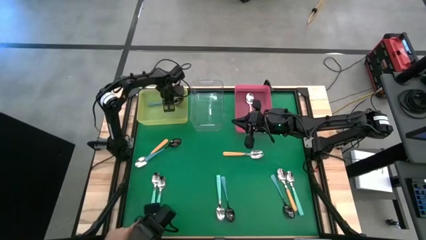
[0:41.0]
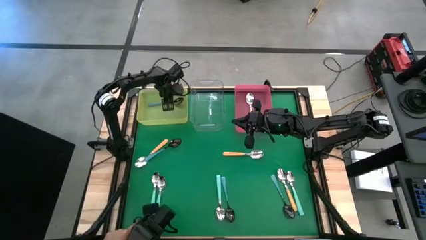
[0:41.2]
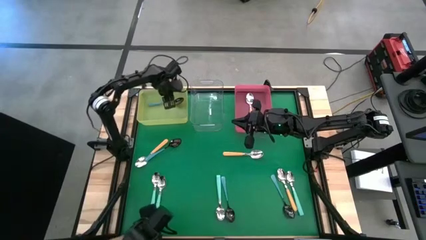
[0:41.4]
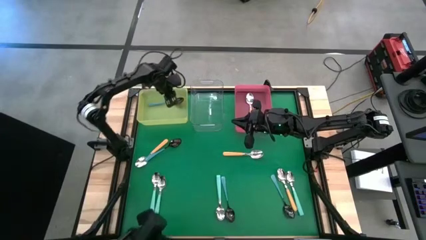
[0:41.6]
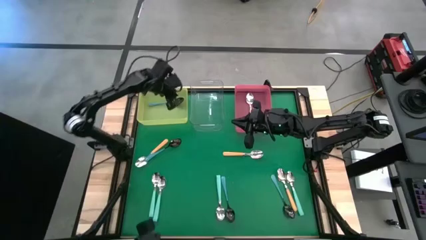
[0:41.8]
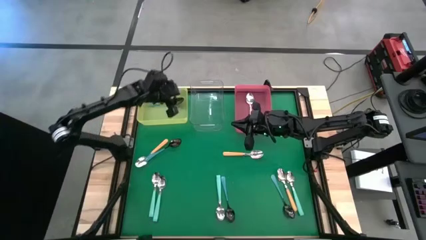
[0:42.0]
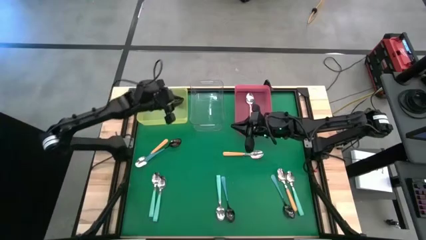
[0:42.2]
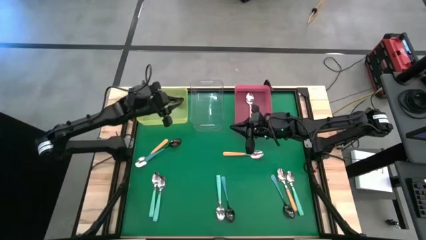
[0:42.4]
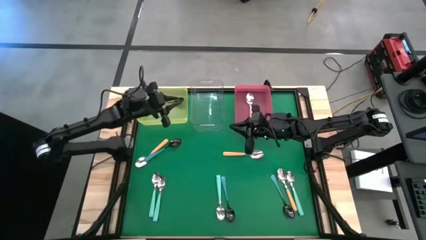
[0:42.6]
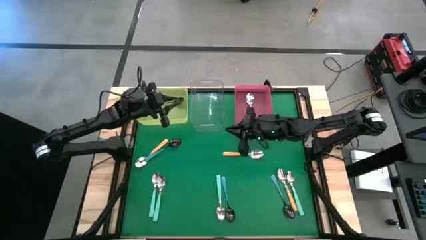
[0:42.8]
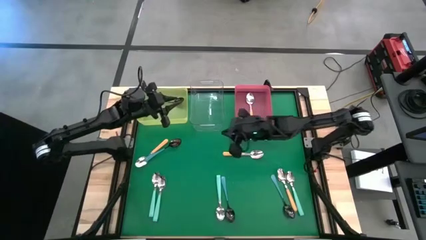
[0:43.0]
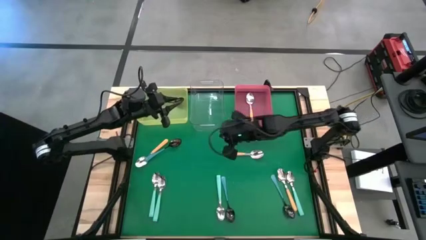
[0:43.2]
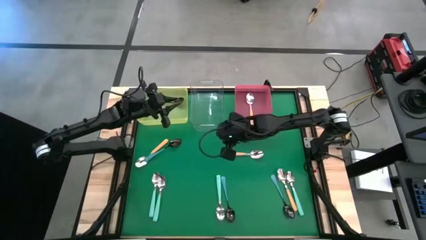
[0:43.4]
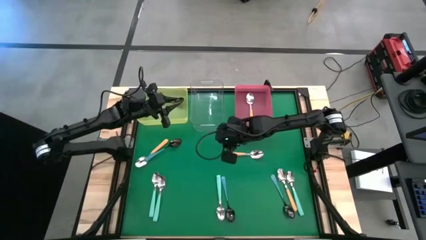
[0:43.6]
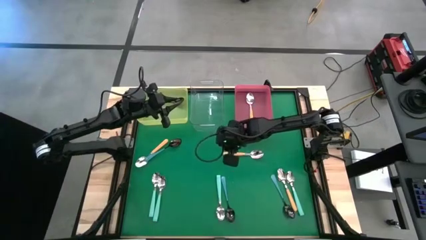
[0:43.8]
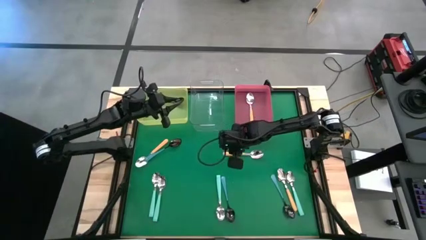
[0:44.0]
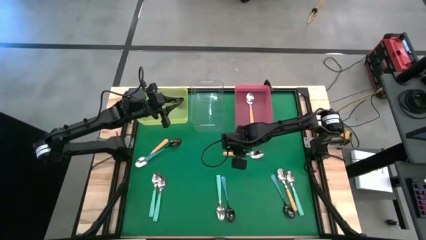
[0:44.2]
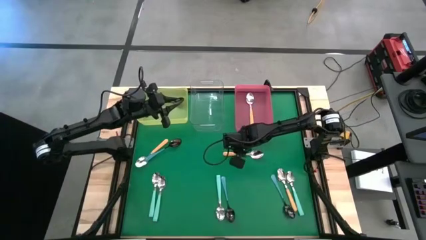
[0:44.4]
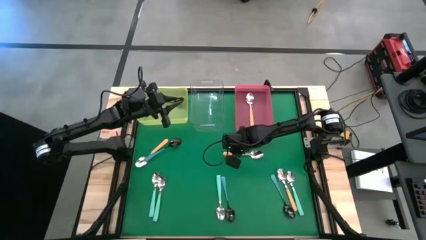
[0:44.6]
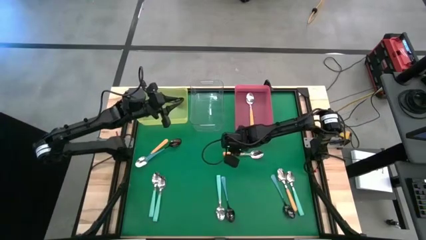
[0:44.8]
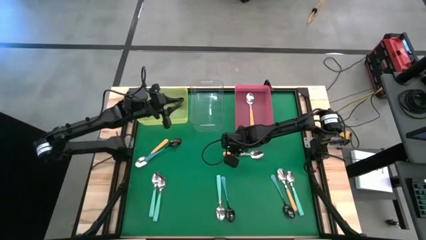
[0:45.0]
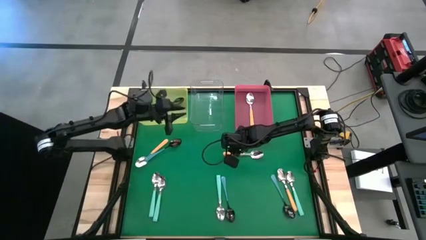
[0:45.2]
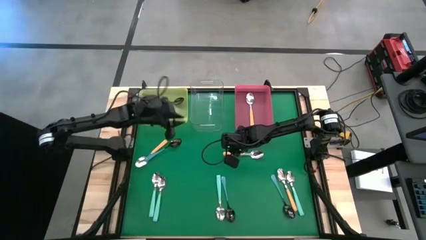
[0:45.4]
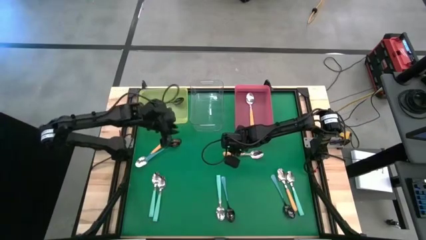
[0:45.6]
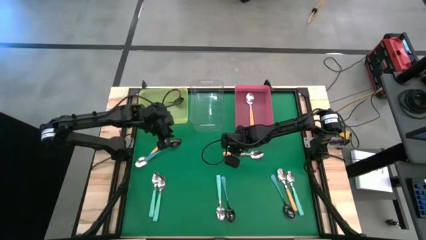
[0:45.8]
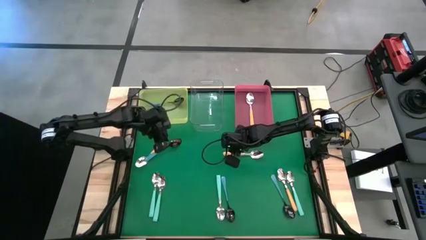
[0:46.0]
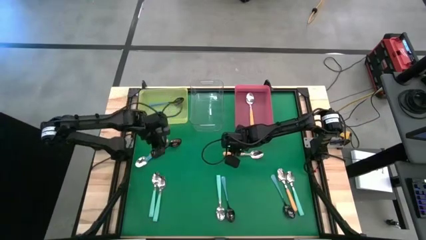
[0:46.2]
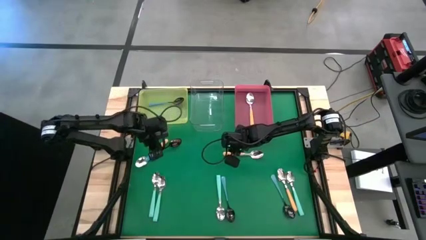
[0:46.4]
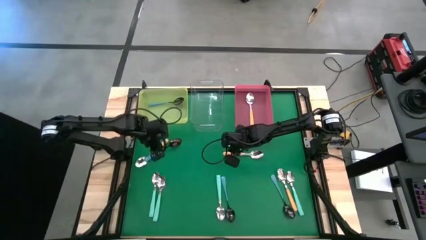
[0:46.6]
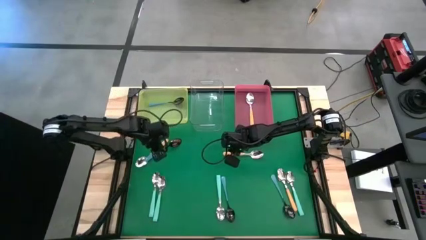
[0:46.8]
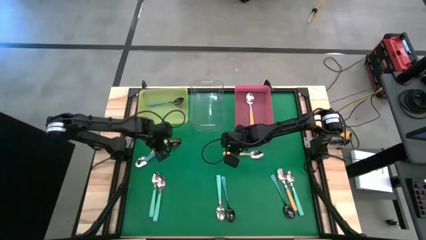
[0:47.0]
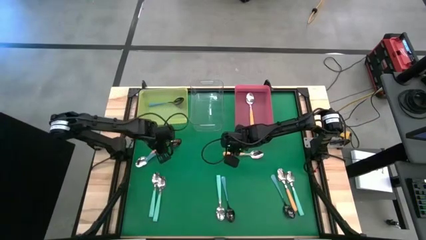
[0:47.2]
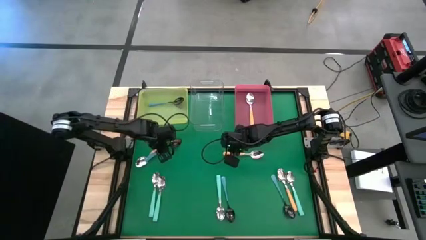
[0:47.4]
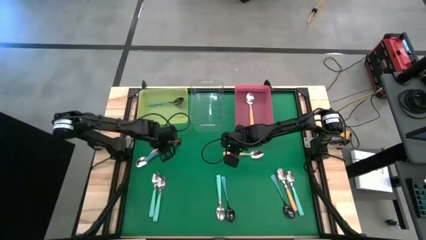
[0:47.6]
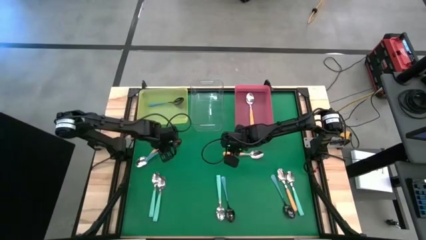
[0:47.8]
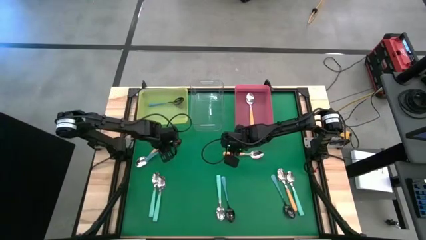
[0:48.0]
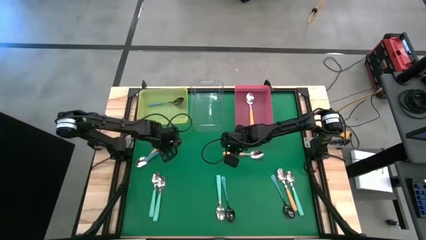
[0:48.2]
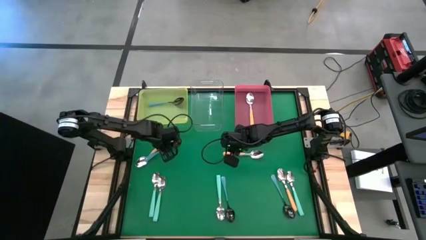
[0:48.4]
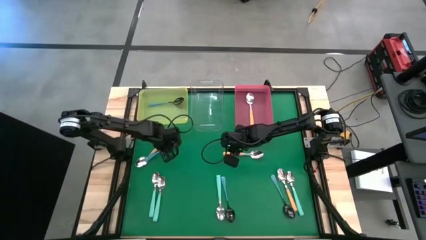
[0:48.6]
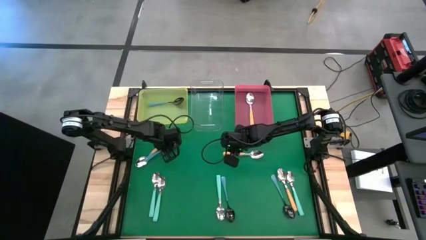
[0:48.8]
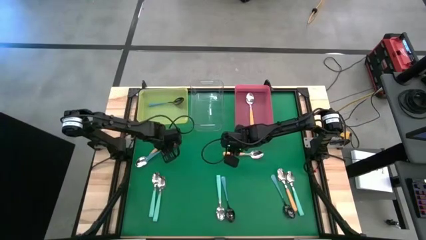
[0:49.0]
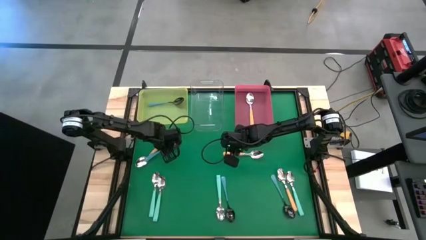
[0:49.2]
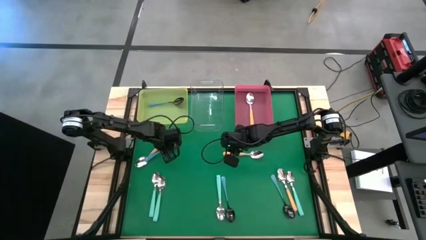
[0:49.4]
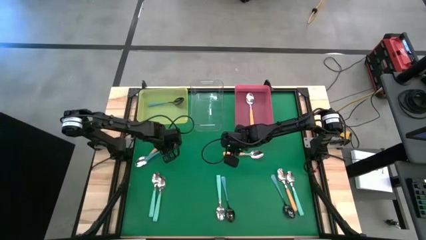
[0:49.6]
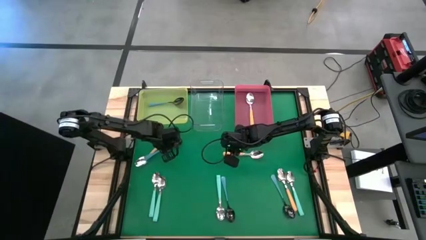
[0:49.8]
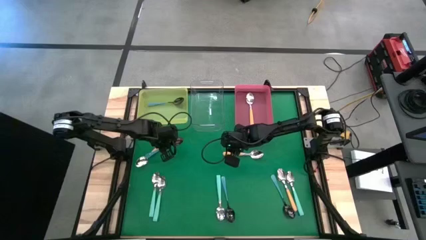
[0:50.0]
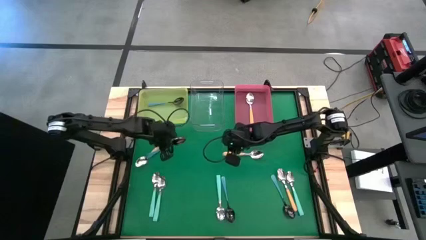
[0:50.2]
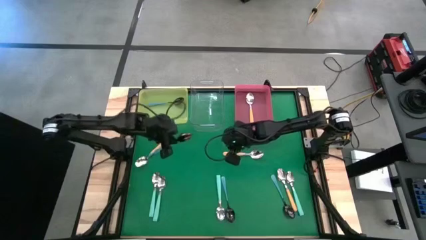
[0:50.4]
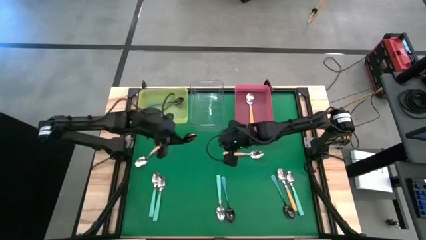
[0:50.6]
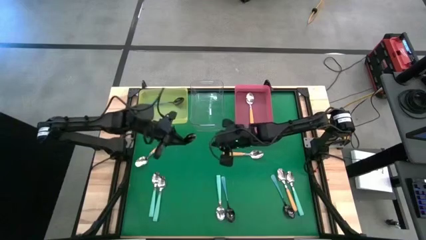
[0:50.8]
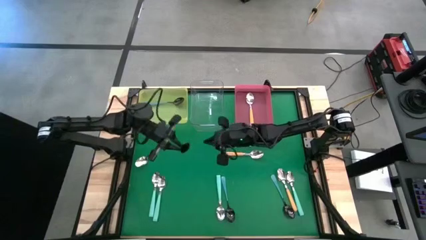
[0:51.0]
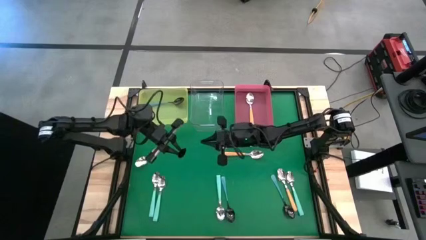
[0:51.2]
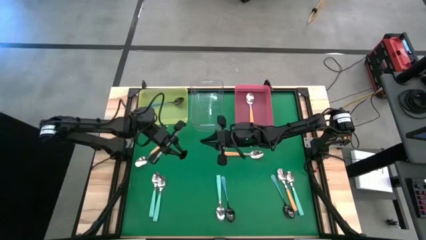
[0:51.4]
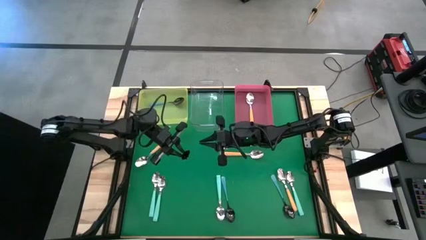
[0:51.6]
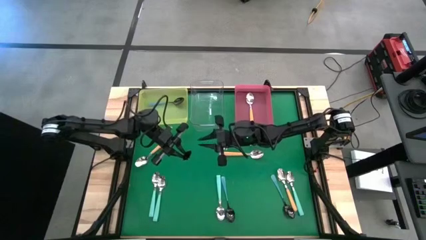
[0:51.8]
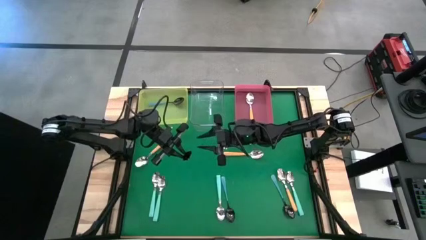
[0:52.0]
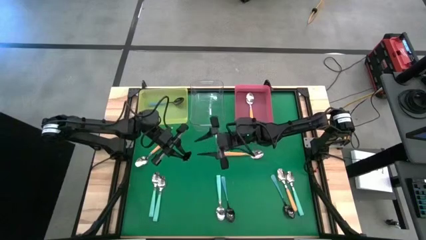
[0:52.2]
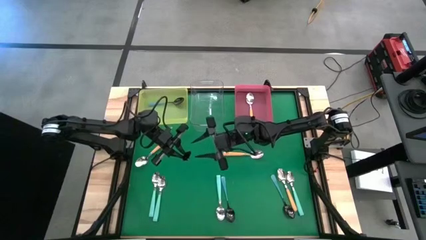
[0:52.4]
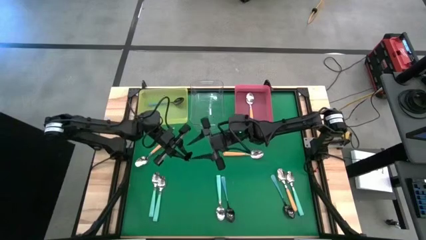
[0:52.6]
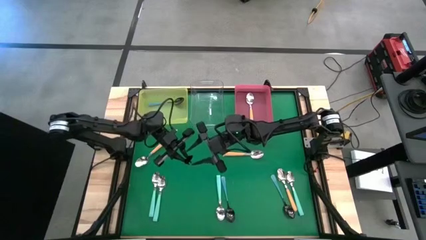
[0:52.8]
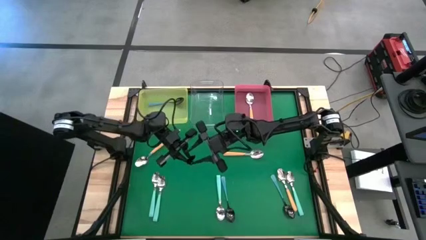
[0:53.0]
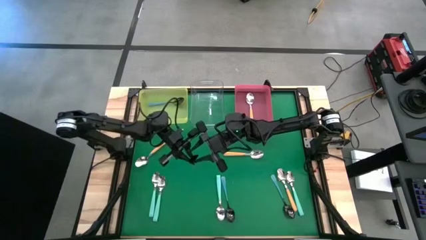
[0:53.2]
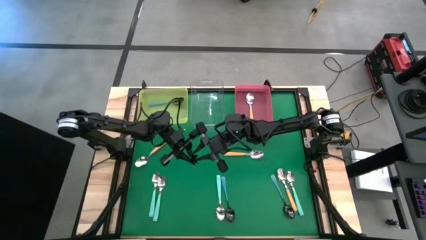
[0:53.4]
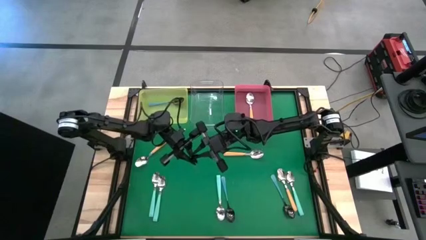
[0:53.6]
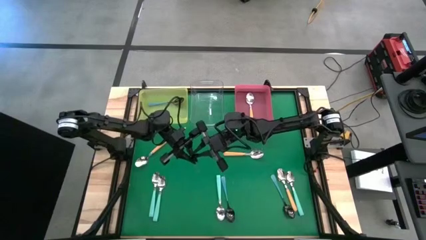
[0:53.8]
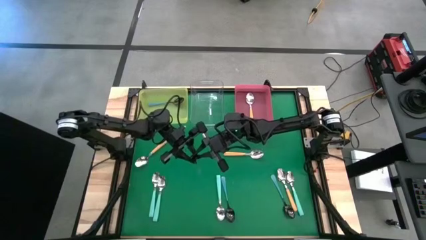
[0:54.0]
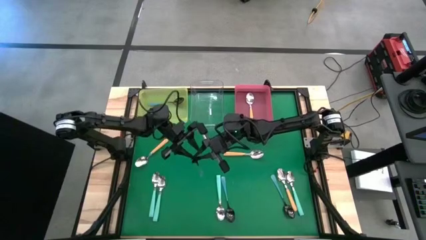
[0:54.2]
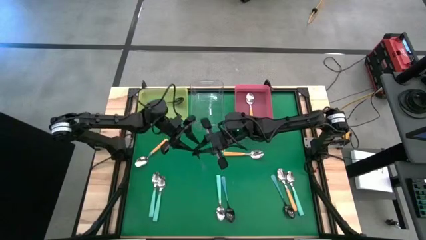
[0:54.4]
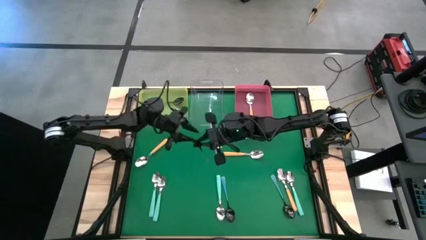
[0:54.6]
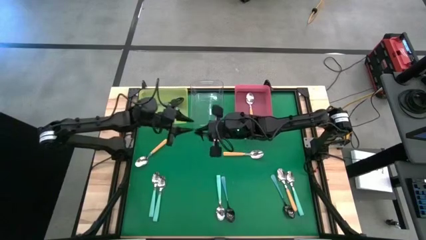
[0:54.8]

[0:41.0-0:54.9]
Task: Sort silverware by color (type)
Put the blue spoon into the yellow bin
